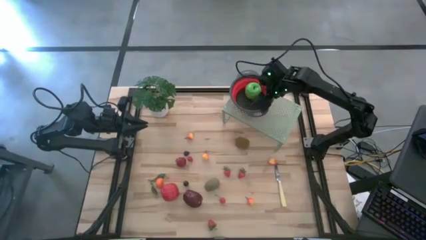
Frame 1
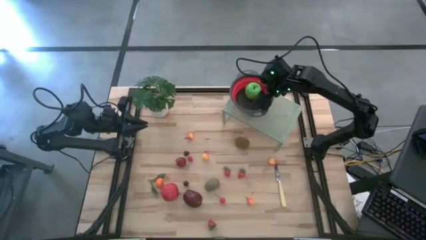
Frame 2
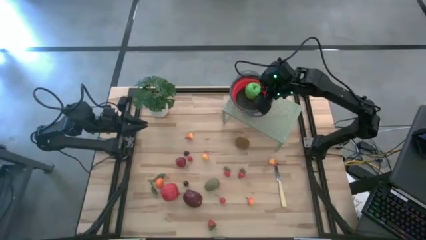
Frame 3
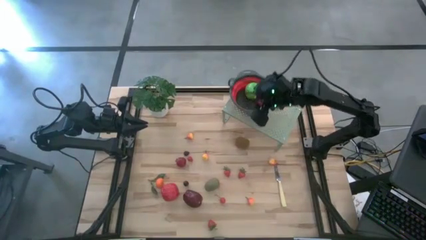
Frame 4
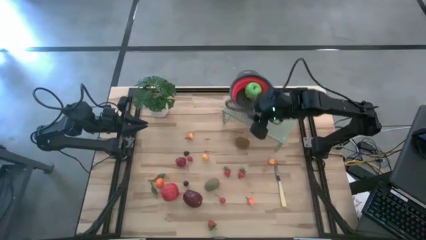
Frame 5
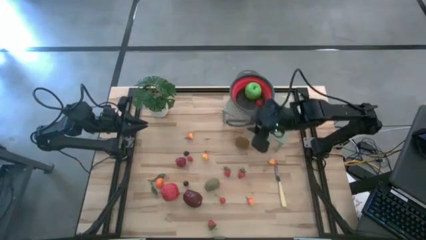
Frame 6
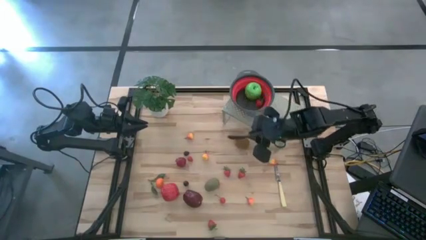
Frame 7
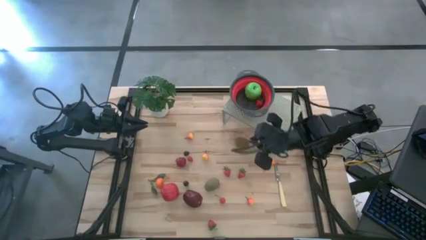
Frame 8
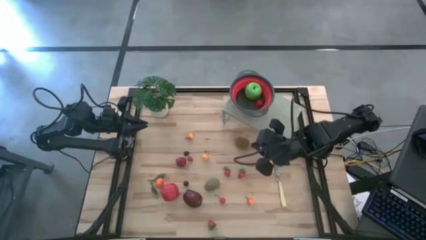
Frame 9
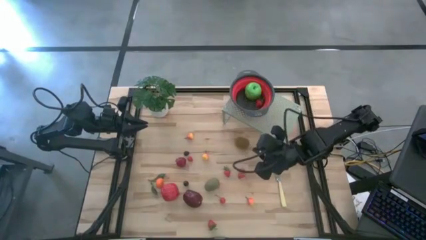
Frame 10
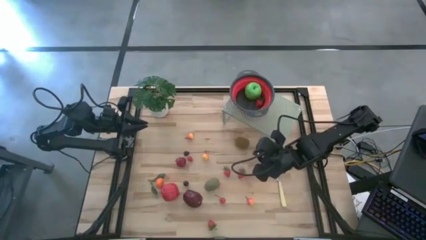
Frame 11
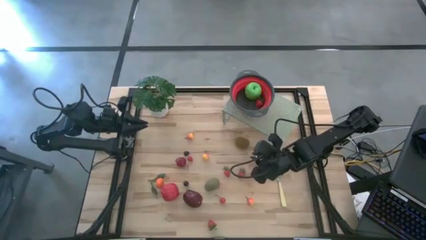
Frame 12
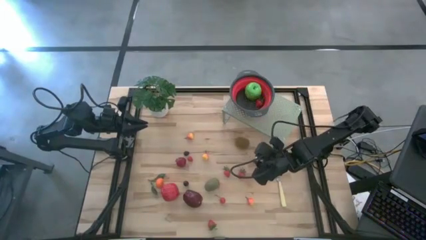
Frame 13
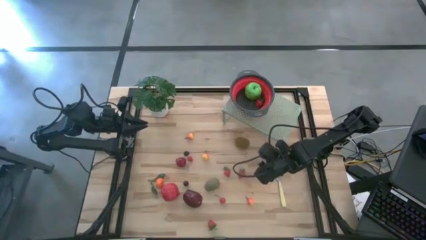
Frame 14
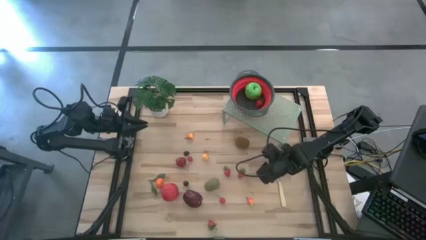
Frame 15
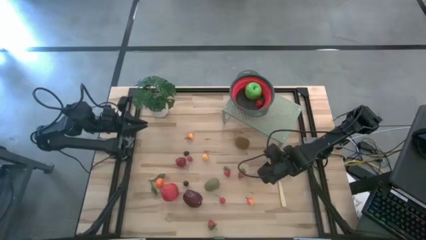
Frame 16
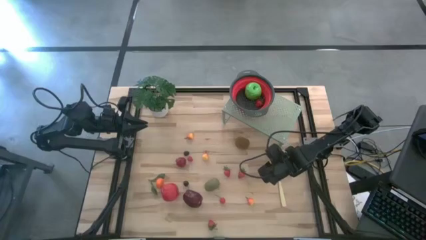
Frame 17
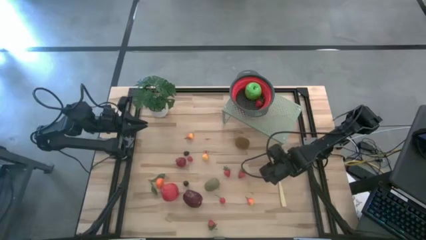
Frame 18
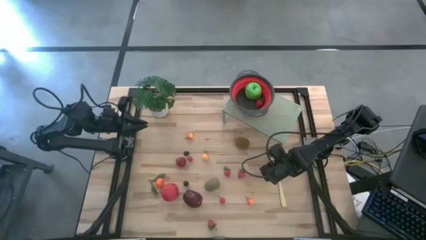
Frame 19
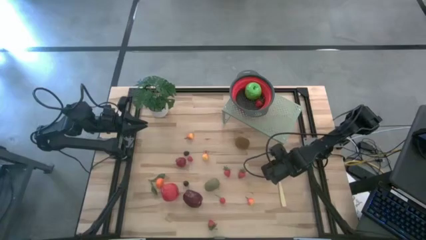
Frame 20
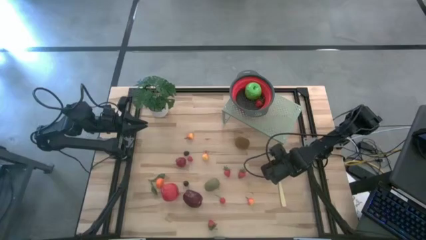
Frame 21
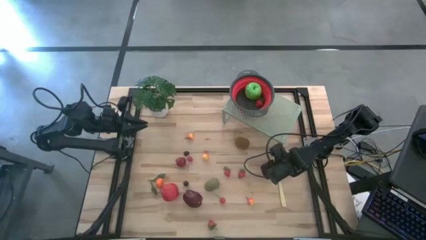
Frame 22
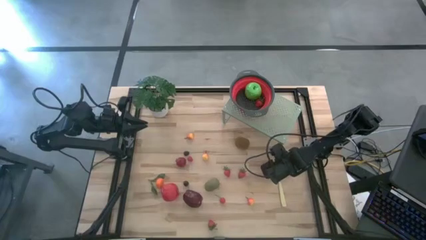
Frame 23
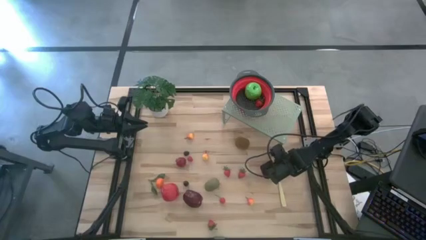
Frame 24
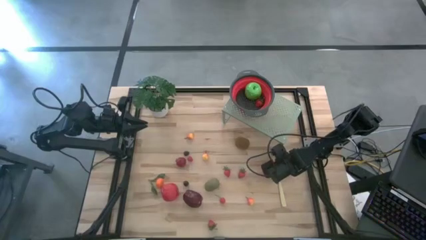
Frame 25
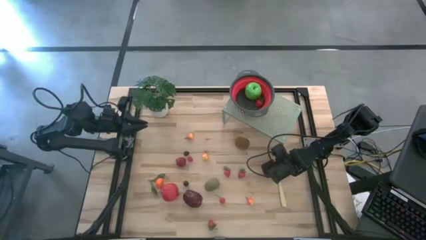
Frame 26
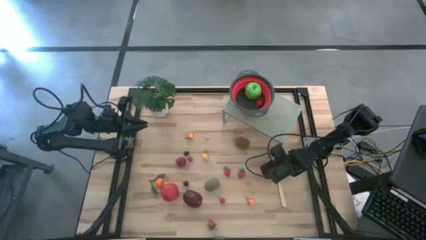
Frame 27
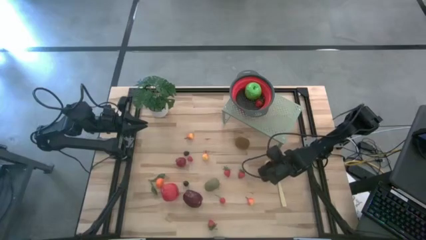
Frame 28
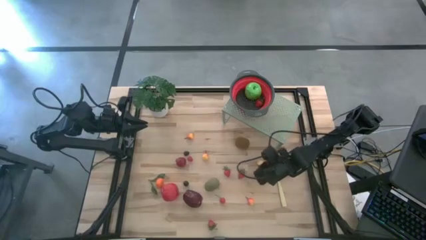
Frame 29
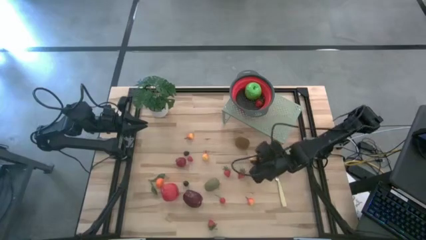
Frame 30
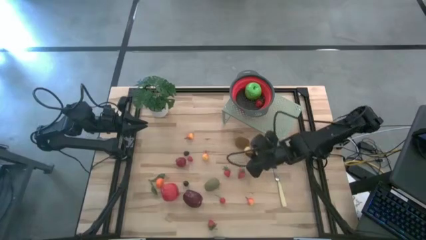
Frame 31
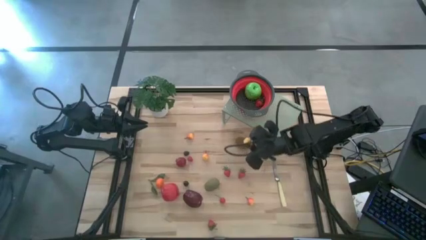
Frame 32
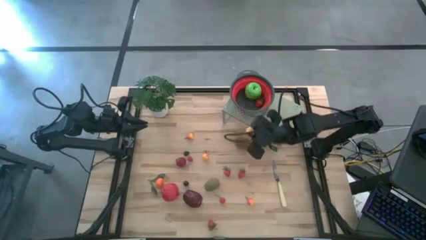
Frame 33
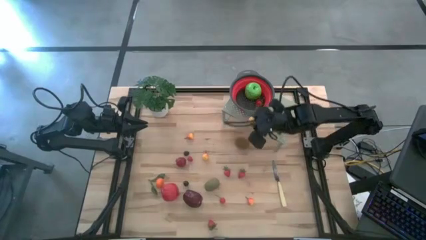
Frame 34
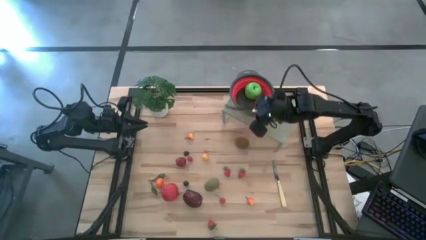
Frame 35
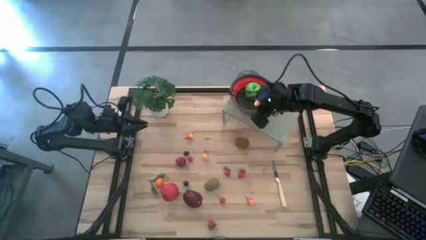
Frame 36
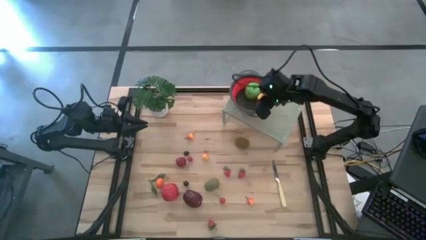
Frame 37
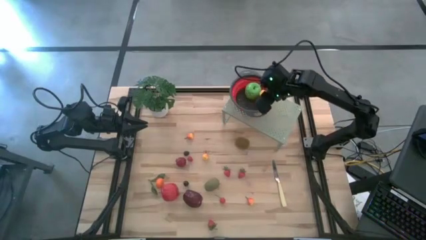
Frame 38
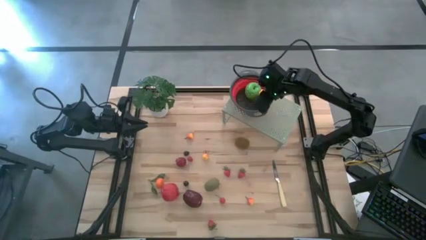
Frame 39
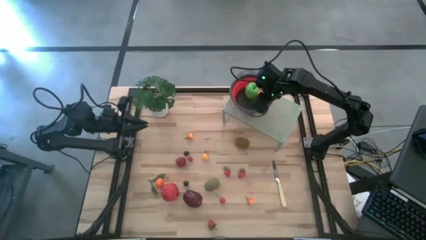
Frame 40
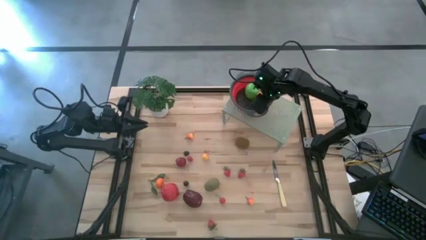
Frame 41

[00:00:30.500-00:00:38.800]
Task: Pick & Place Fruit
Put the yellow pear into the red strainer bowl

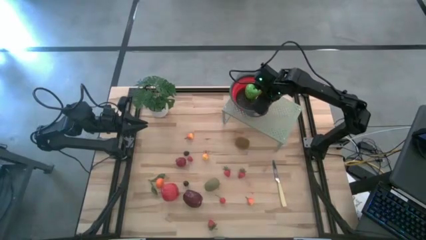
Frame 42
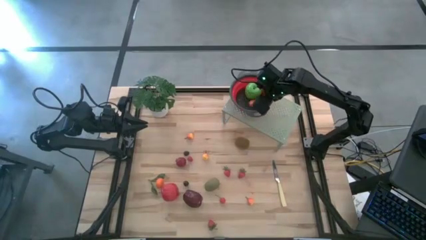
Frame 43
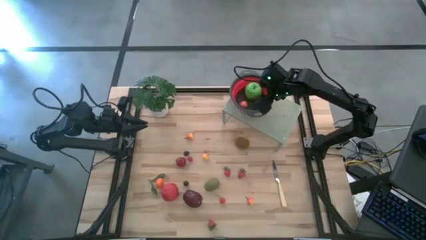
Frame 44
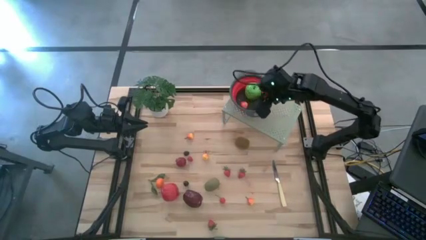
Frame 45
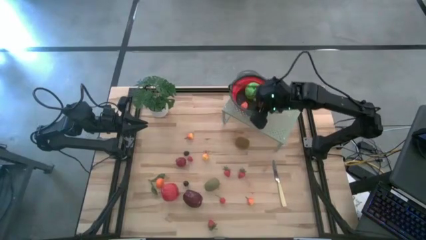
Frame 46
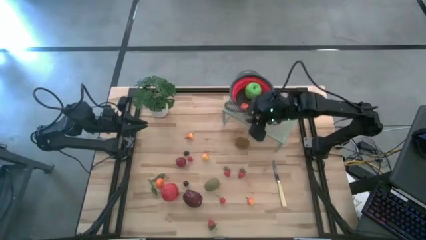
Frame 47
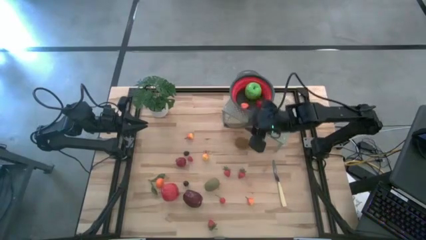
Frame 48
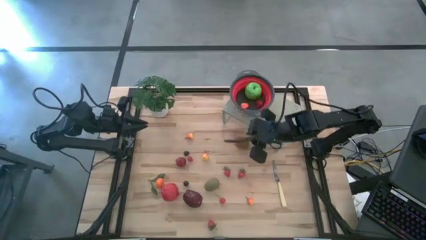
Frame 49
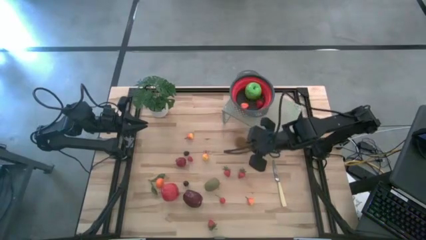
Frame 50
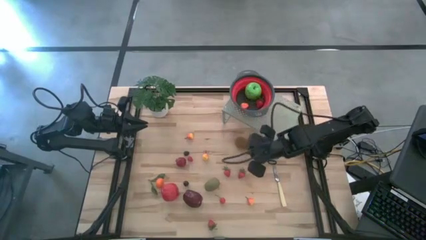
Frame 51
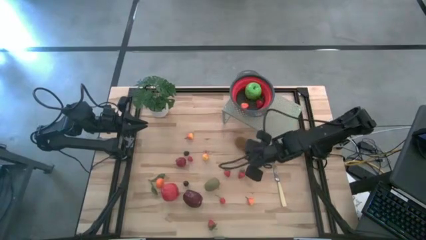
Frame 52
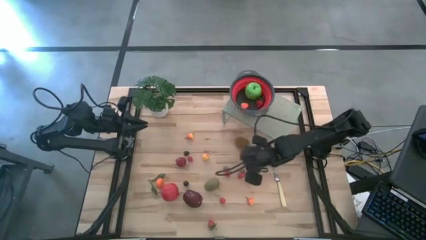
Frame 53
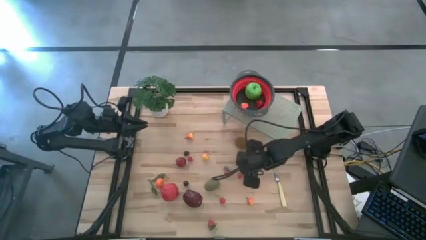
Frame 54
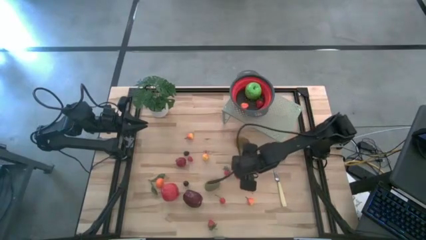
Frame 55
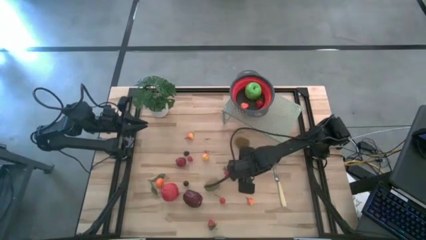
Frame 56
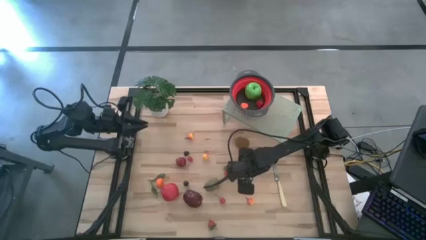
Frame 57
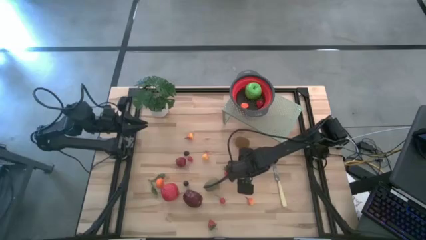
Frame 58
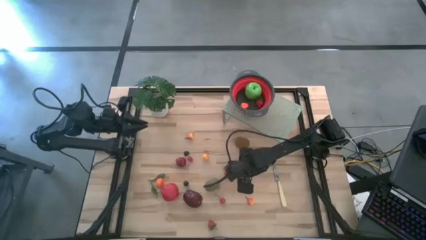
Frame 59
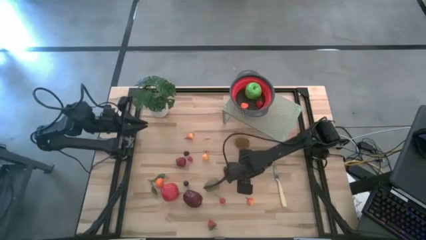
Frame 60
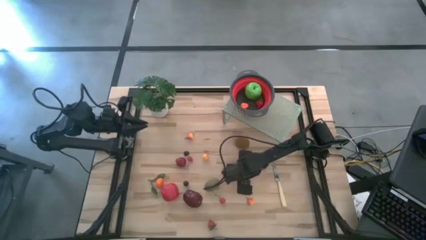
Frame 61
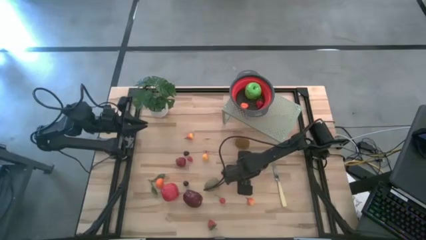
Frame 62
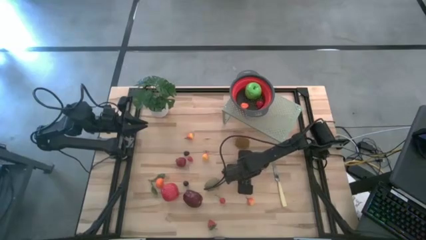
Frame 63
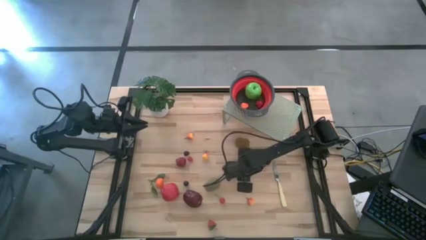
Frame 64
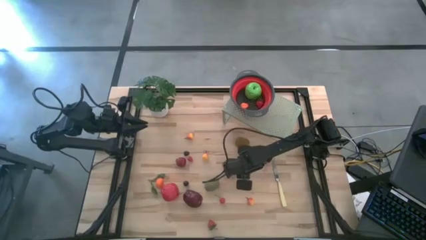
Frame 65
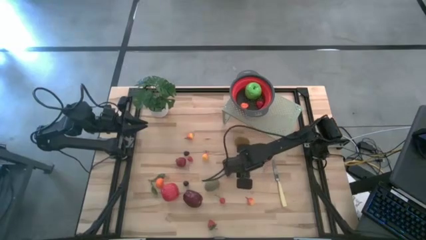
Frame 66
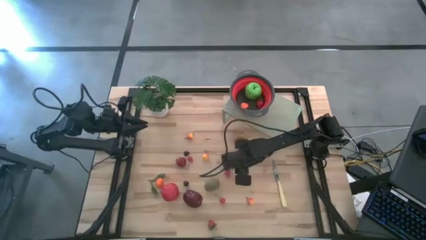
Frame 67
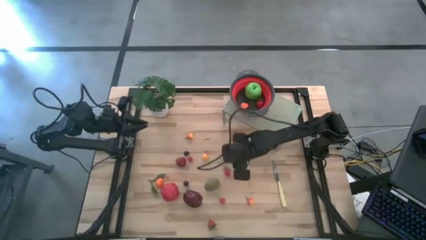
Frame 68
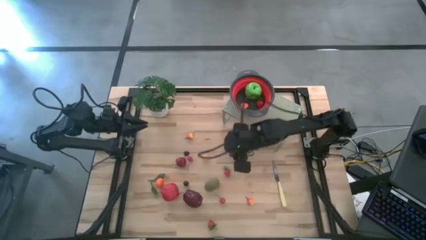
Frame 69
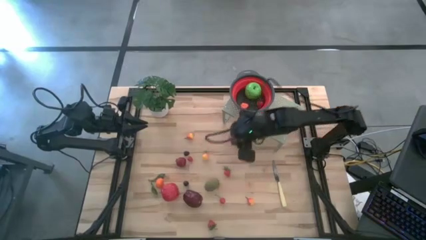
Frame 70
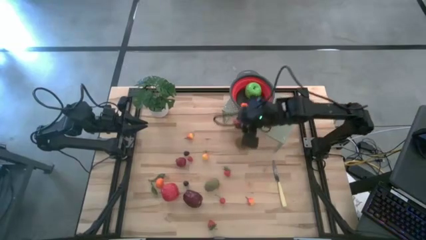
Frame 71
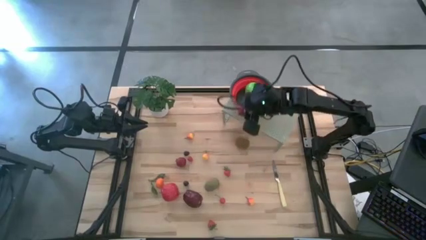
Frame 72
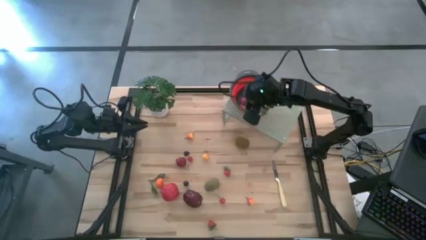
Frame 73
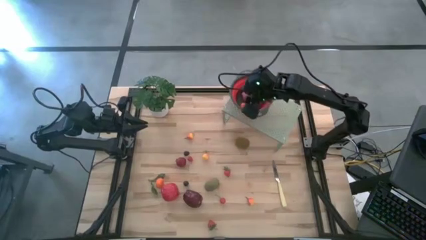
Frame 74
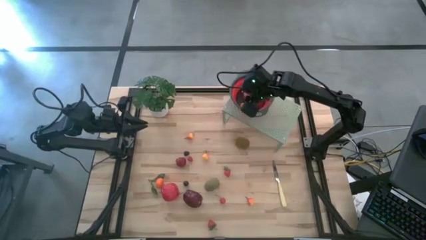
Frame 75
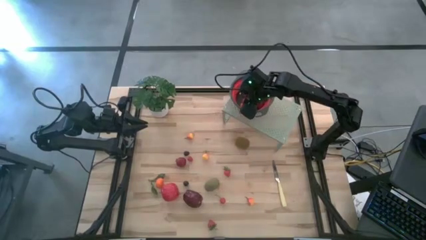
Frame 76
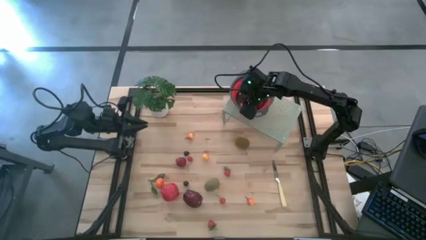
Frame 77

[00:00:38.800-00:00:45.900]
Put the red strawberry into the red strainer bowl
